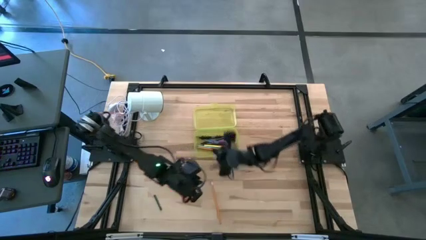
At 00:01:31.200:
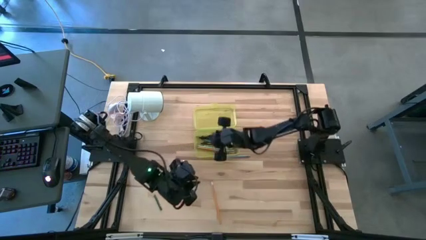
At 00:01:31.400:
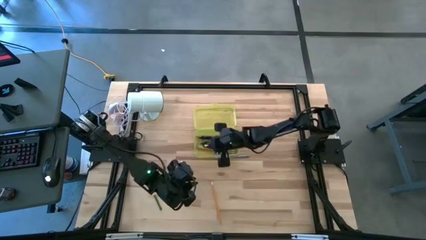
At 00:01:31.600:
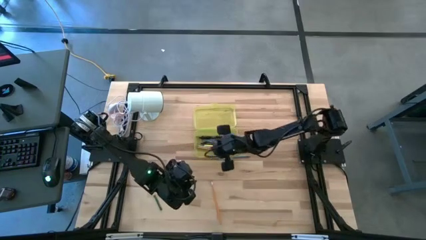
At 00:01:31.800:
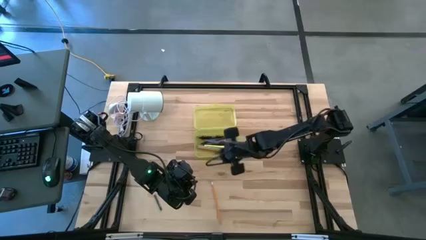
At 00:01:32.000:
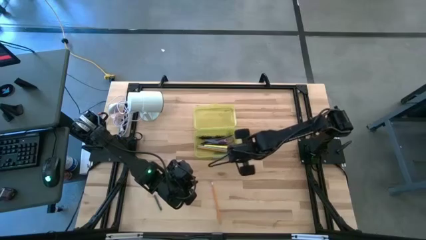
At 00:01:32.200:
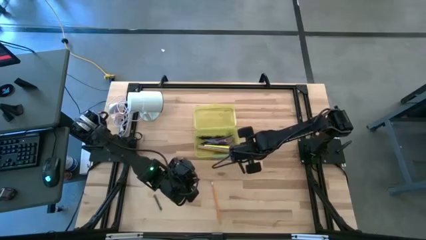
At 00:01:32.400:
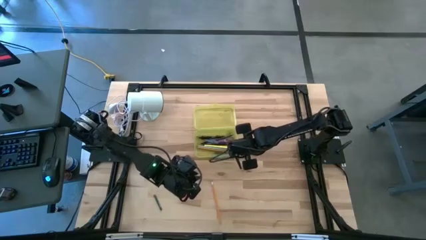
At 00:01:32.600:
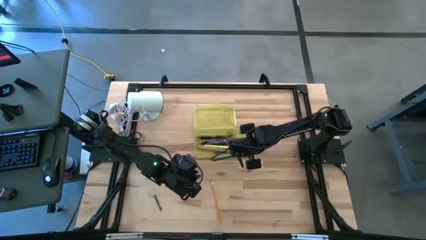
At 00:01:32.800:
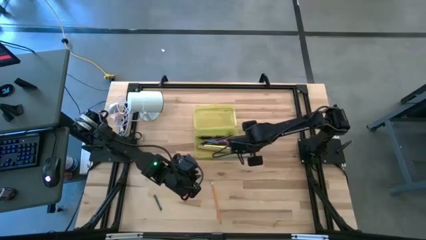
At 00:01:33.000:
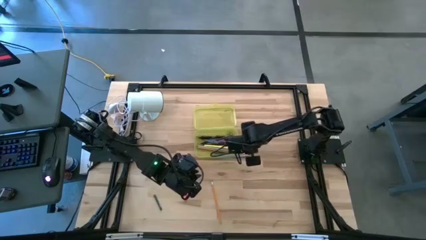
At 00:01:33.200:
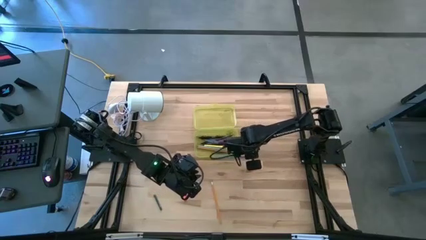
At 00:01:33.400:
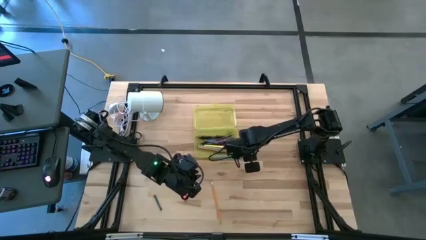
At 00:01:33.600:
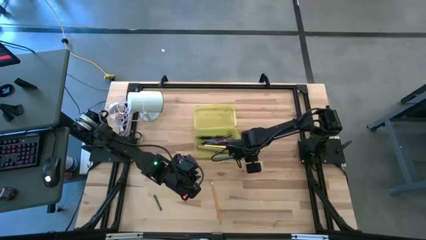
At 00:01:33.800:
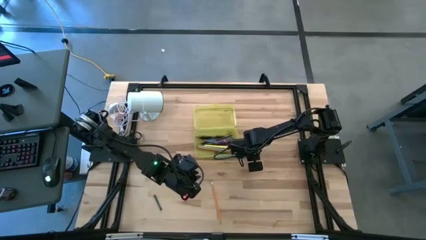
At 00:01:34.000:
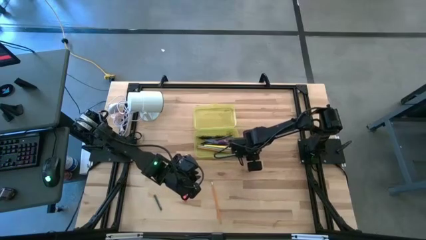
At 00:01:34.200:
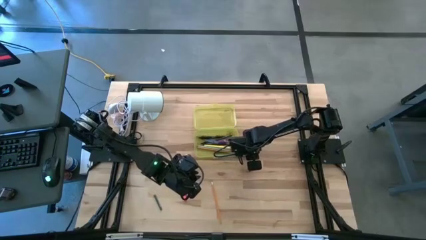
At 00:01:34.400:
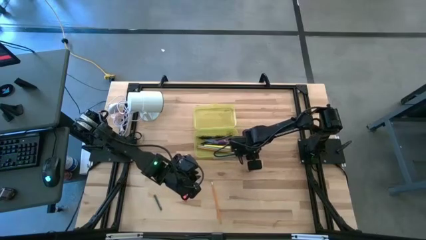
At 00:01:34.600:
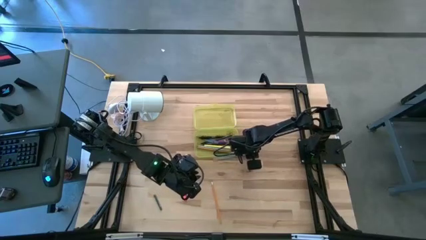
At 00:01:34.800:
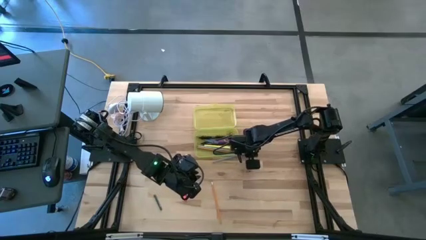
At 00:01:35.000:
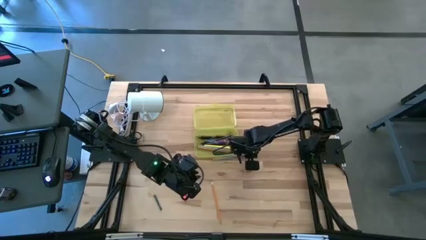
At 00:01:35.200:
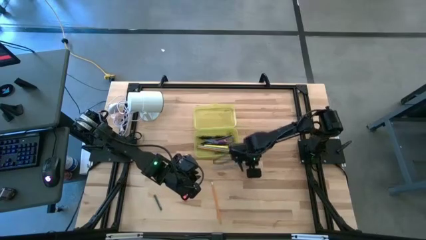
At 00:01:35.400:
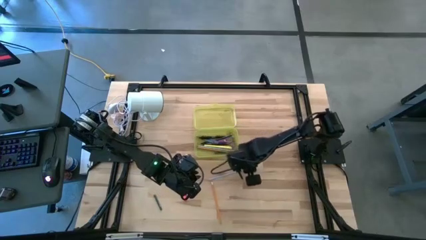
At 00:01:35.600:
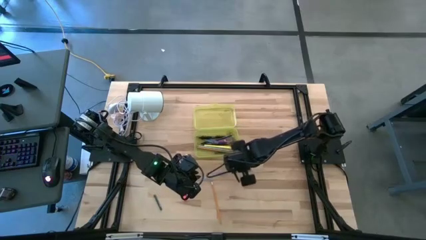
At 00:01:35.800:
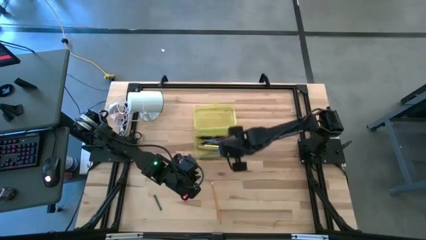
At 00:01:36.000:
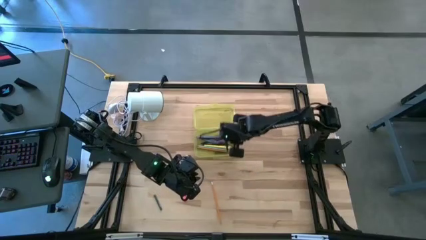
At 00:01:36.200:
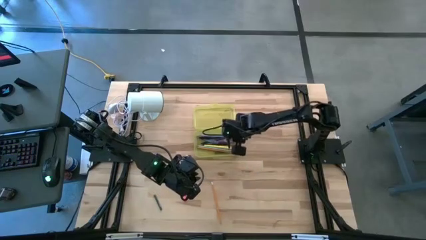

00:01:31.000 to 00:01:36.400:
Task: Pick & place school supplies into a supply box
Put the light blue pencil into the supply box

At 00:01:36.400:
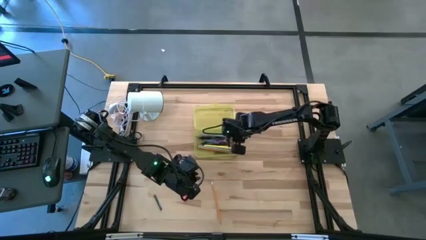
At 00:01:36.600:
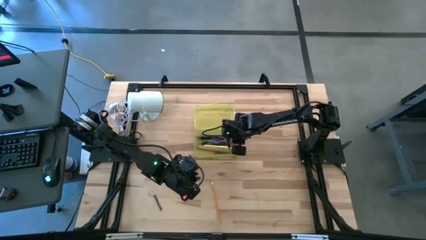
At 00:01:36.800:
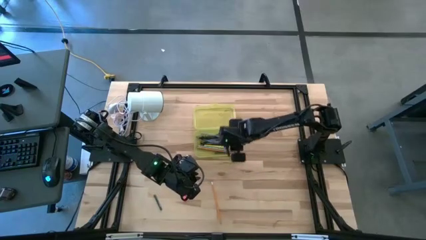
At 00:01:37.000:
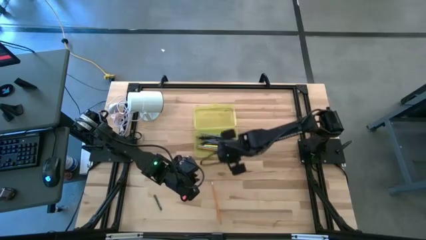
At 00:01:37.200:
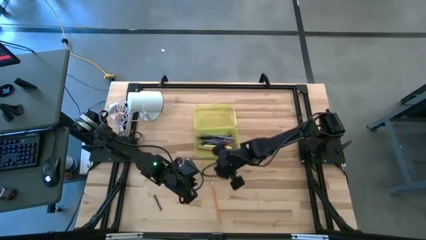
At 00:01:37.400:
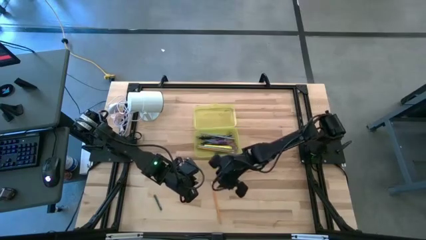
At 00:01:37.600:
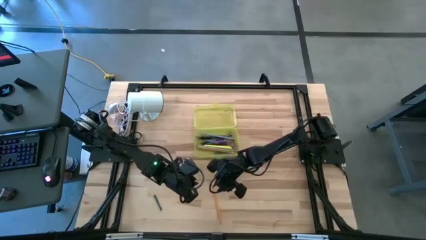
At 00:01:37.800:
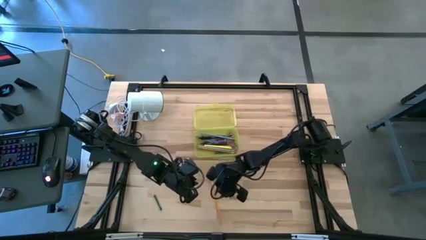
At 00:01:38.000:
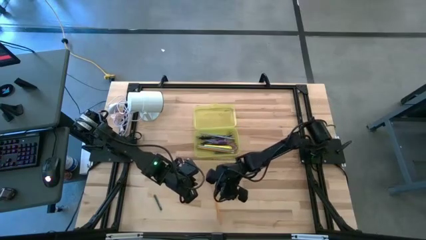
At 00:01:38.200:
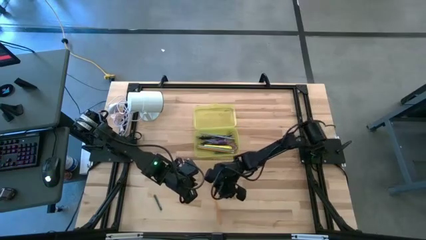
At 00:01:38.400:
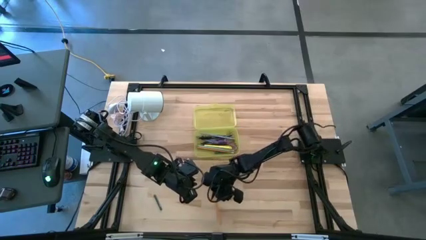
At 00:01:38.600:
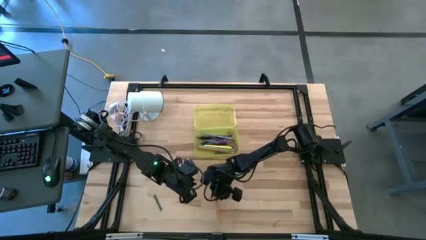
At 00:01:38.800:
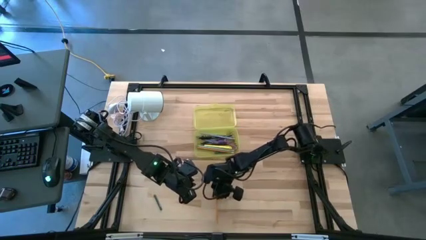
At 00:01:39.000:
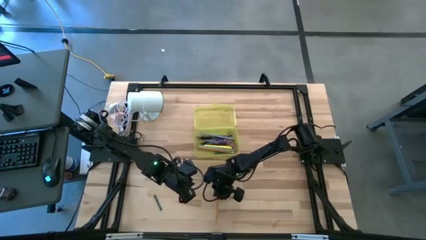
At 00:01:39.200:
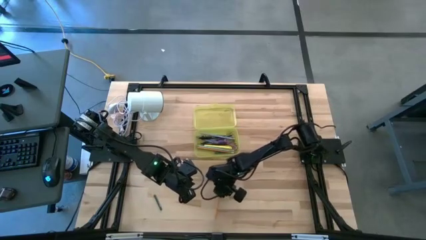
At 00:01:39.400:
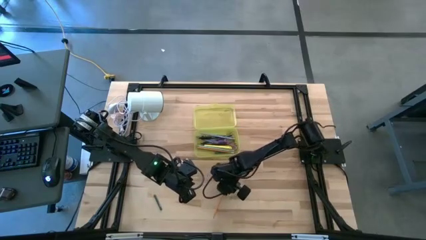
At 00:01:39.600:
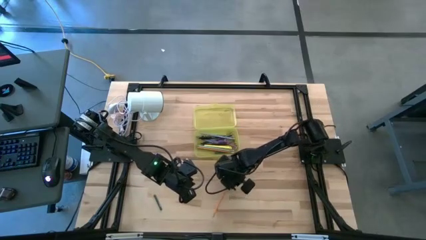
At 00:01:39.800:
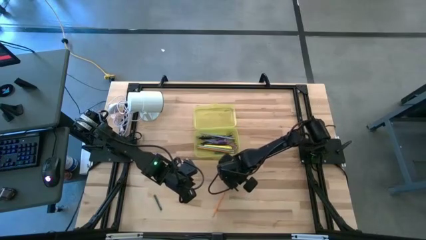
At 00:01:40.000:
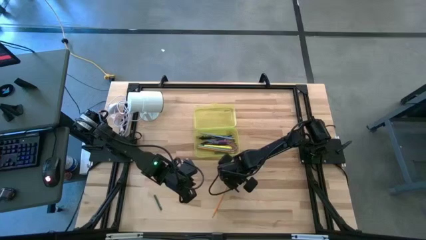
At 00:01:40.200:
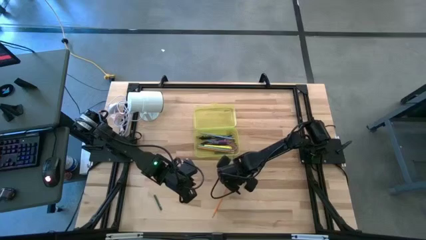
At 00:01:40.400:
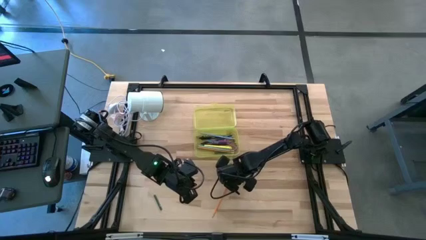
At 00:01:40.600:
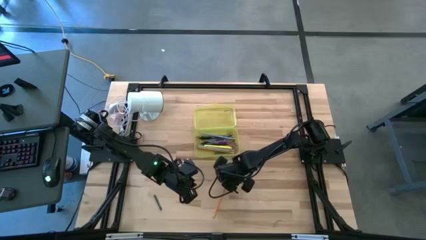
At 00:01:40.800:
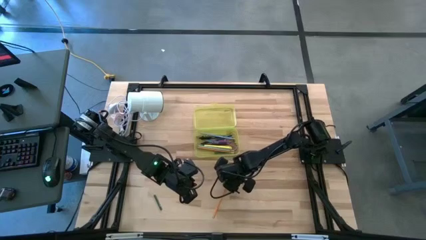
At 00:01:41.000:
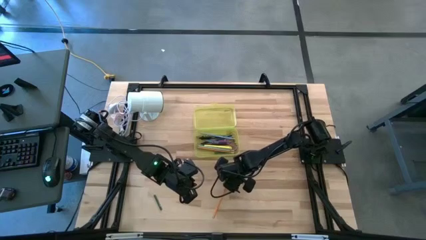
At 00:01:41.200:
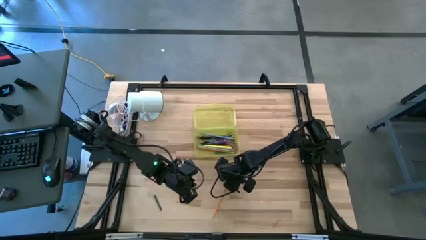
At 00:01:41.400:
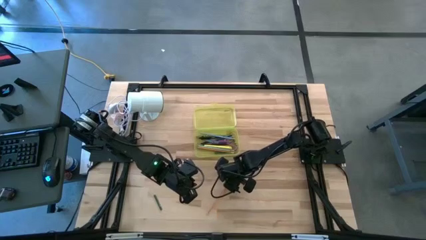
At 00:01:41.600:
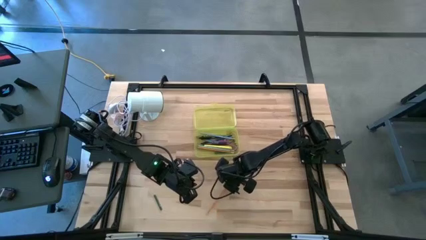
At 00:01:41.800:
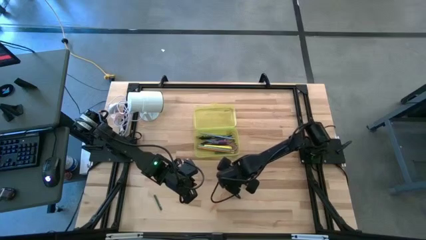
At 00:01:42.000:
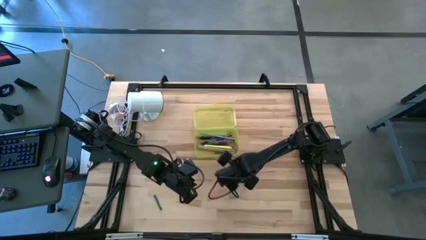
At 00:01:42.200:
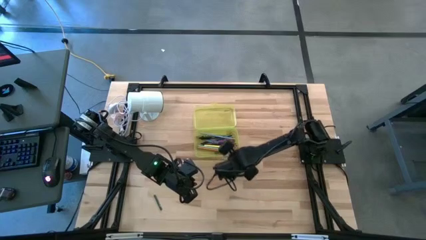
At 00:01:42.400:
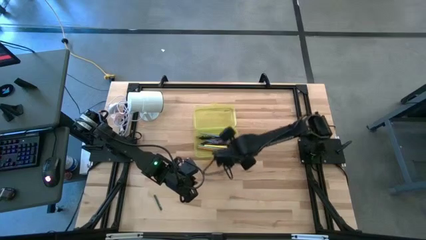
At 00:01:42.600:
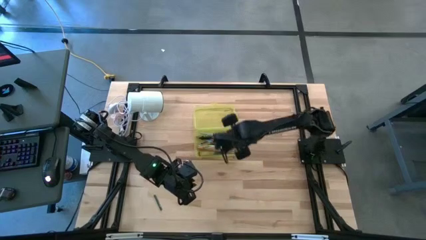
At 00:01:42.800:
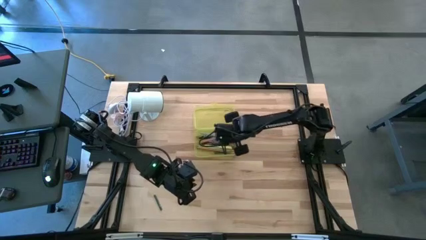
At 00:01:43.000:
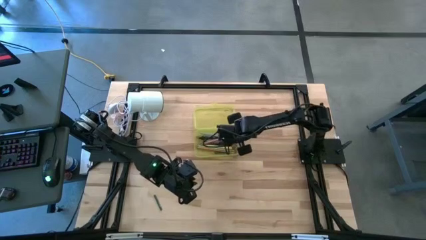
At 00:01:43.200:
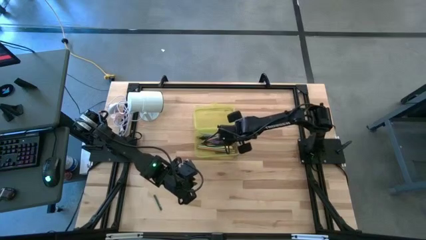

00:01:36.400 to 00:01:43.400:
Put the orange pencil into the supply box

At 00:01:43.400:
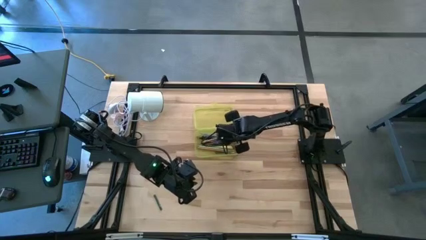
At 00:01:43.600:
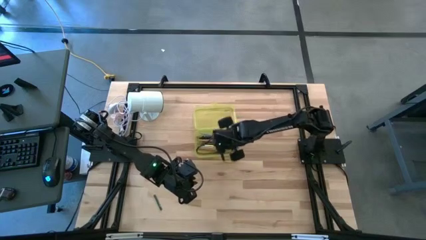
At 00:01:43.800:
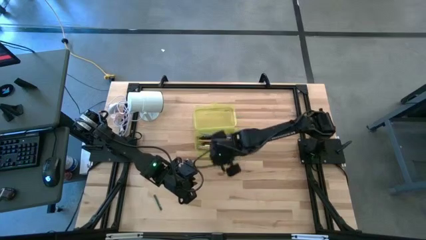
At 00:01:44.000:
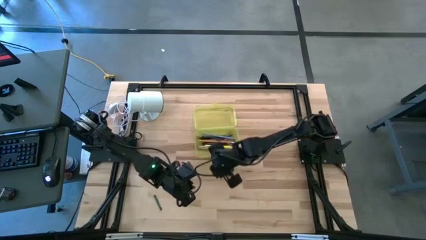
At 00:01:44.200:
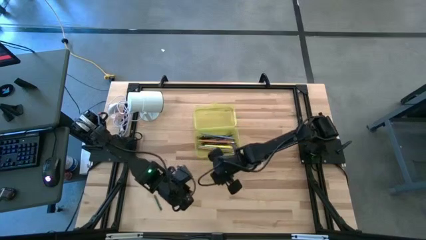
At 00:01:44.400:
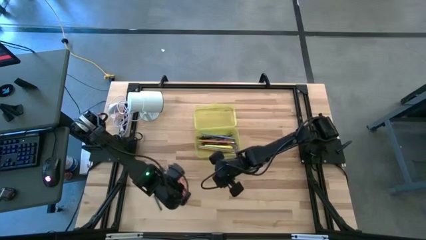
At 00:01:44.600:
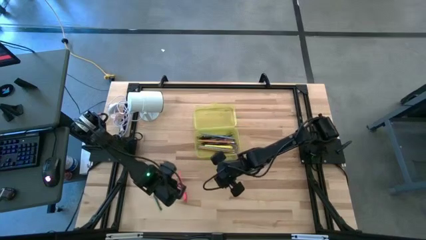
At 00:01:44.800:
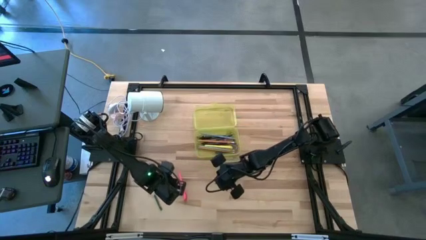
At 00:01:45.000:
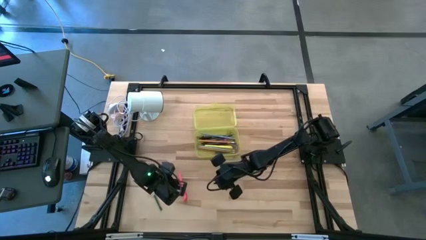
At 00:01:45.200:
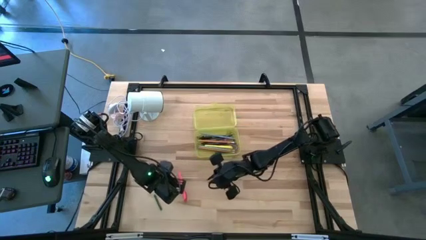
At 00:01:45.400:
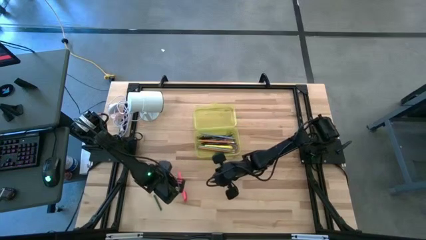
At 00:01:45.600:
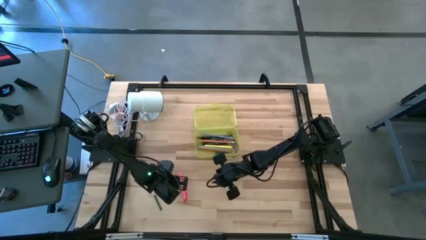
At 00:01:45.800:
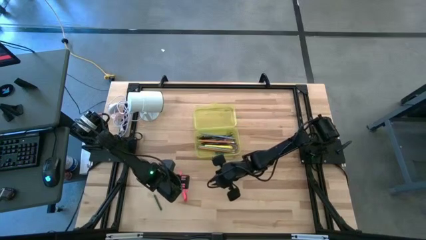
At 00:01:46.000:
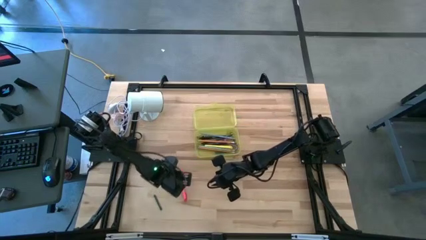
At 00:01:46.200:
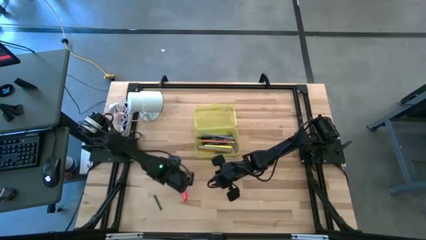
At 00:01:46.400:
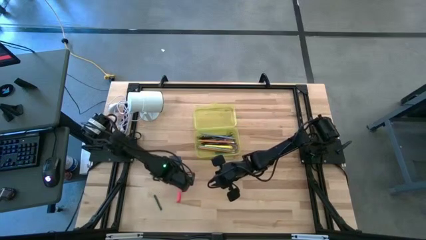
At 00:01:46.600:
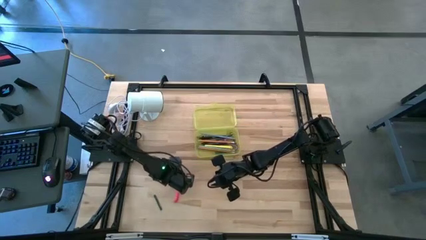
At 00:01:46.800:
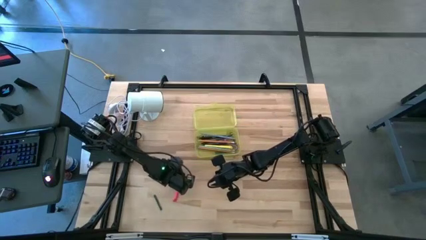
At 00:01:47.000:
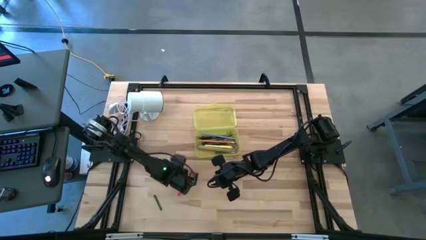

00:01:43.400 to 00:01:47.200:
Put the pink pen into the supply box
